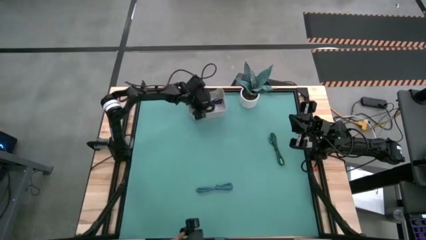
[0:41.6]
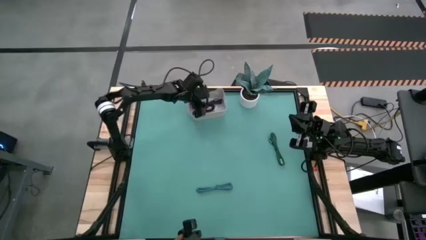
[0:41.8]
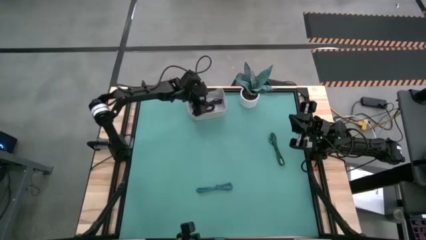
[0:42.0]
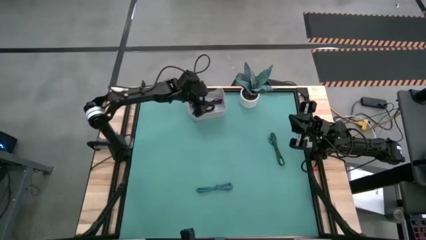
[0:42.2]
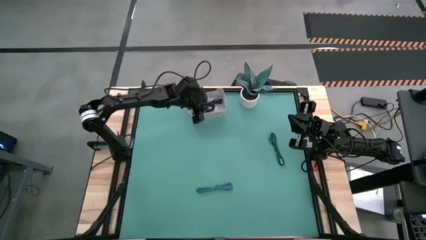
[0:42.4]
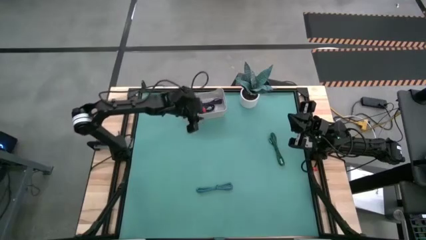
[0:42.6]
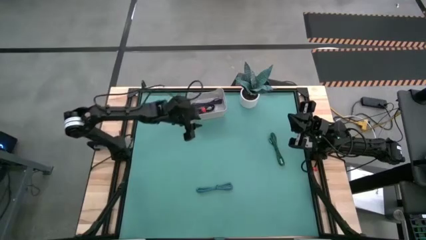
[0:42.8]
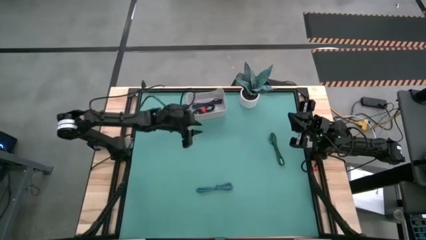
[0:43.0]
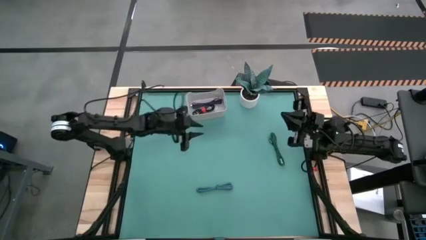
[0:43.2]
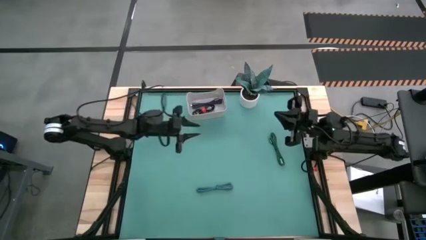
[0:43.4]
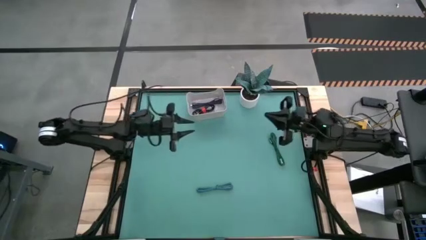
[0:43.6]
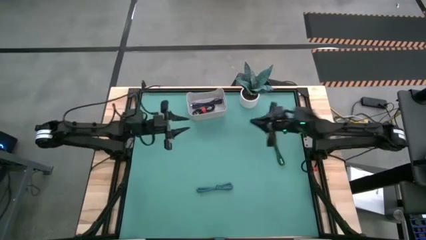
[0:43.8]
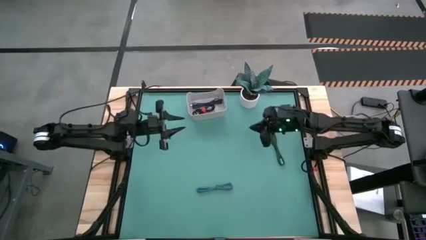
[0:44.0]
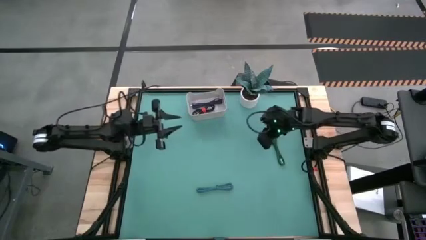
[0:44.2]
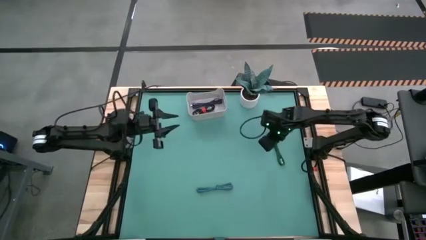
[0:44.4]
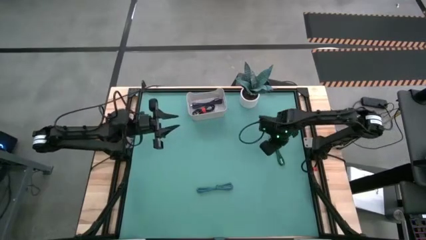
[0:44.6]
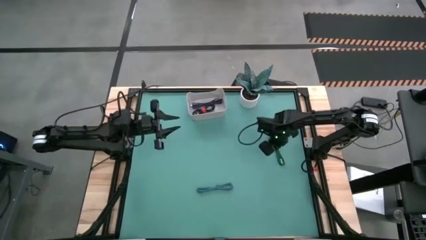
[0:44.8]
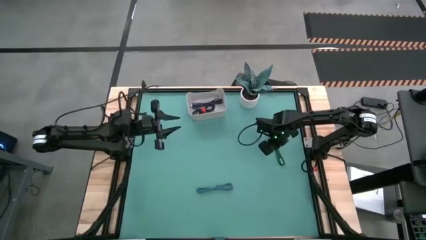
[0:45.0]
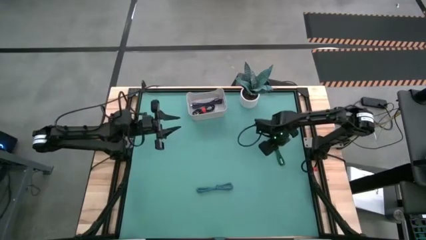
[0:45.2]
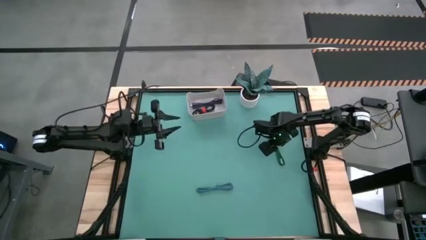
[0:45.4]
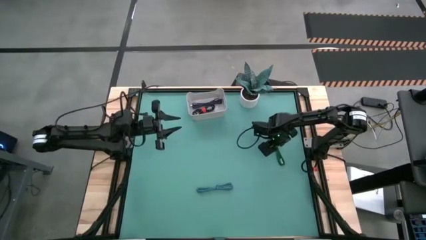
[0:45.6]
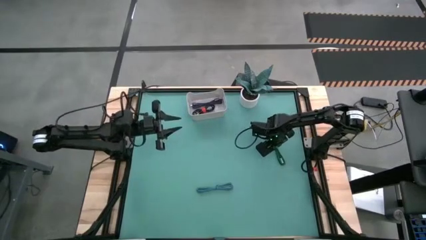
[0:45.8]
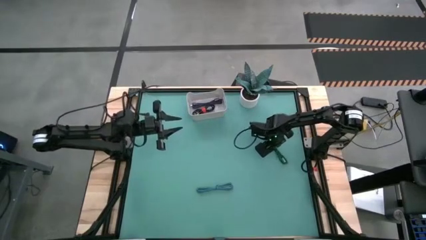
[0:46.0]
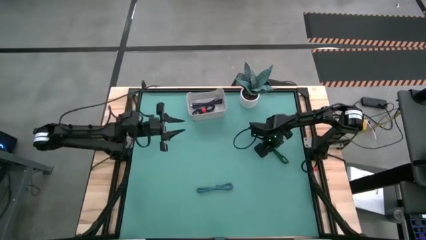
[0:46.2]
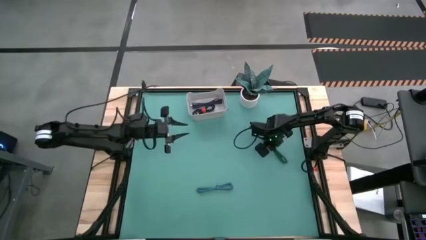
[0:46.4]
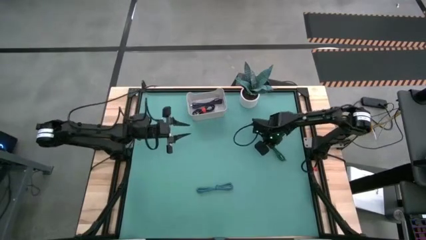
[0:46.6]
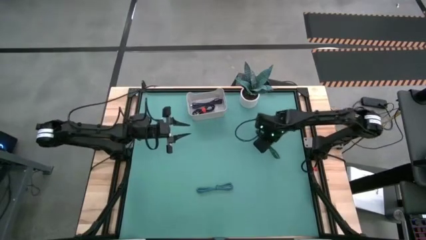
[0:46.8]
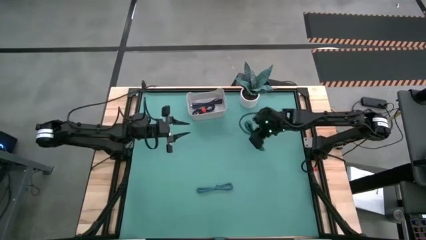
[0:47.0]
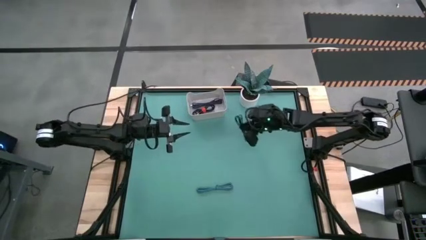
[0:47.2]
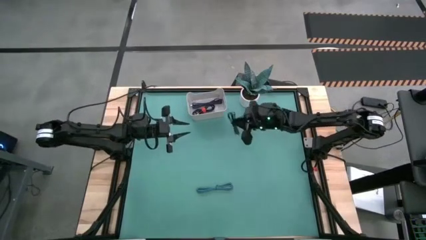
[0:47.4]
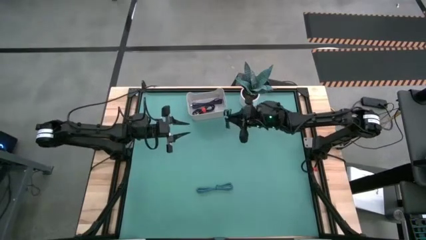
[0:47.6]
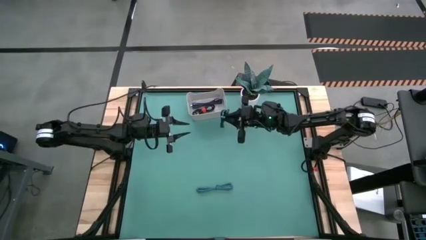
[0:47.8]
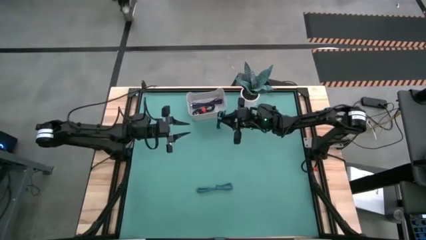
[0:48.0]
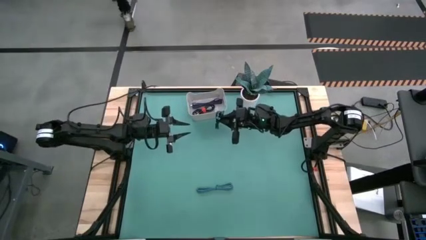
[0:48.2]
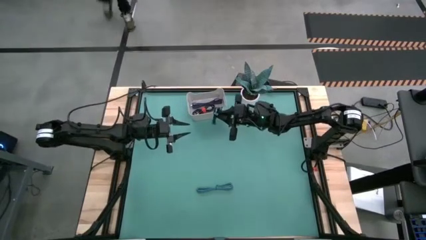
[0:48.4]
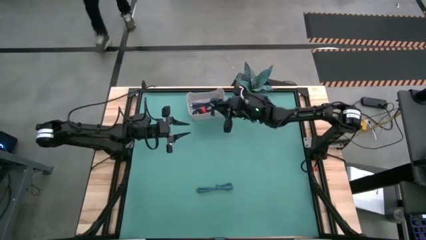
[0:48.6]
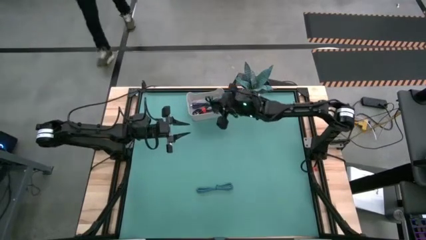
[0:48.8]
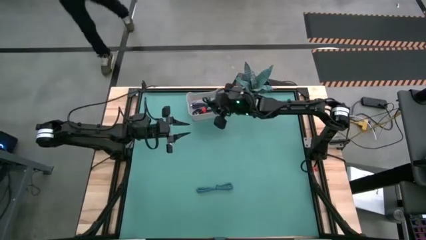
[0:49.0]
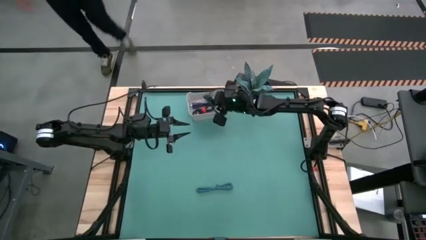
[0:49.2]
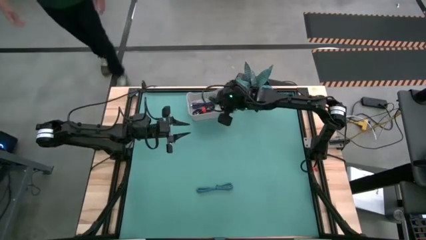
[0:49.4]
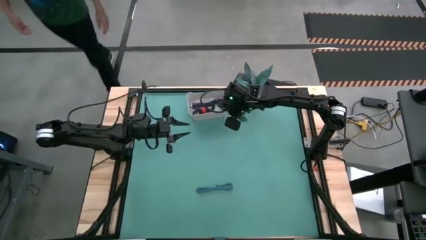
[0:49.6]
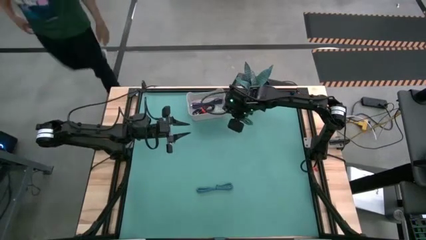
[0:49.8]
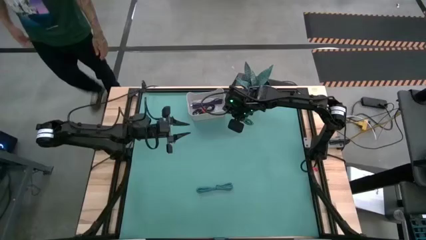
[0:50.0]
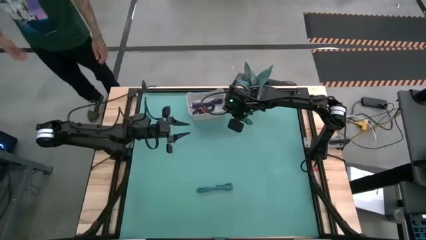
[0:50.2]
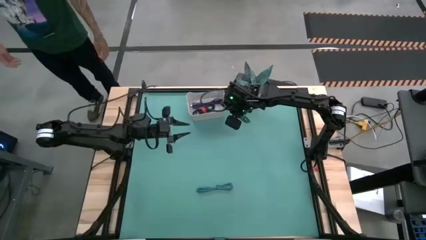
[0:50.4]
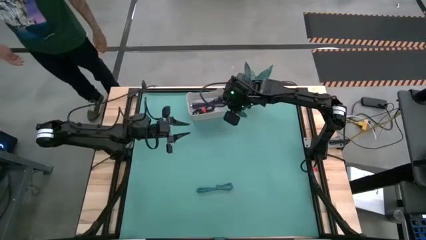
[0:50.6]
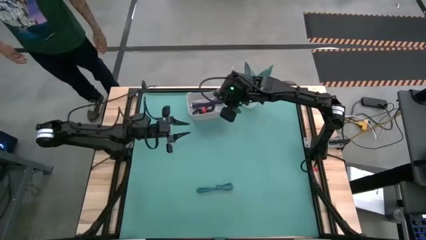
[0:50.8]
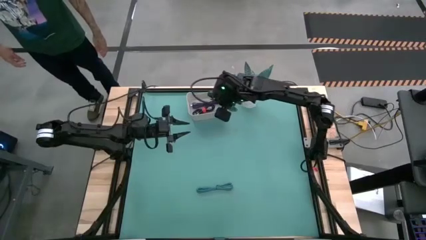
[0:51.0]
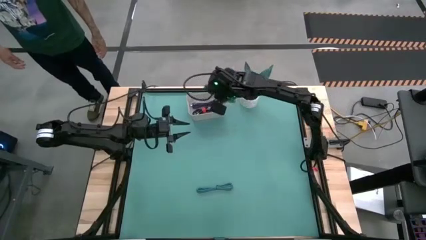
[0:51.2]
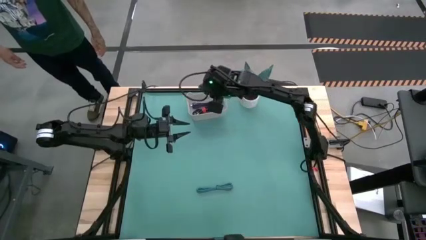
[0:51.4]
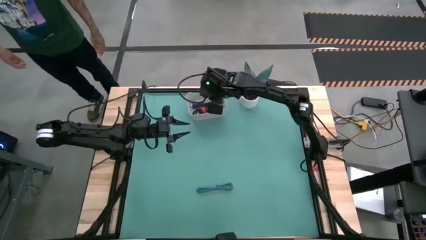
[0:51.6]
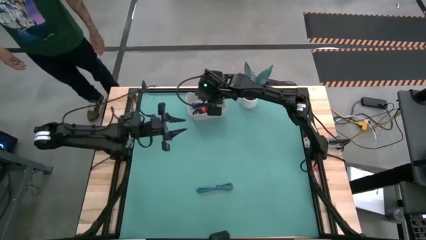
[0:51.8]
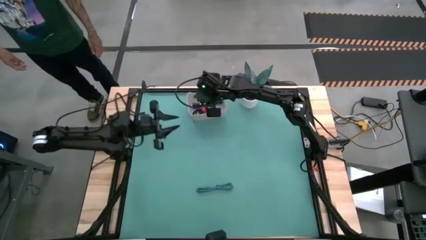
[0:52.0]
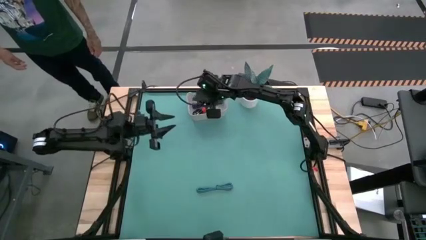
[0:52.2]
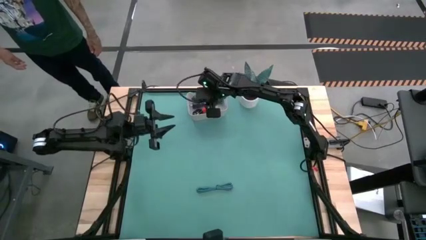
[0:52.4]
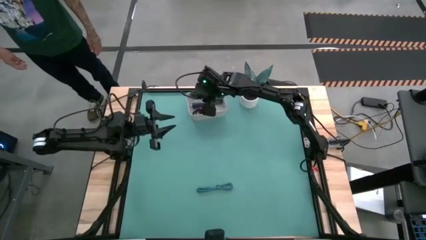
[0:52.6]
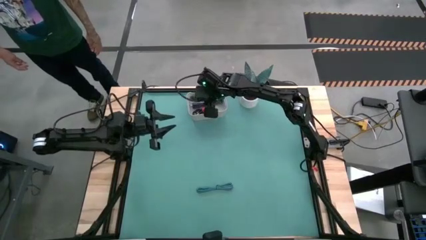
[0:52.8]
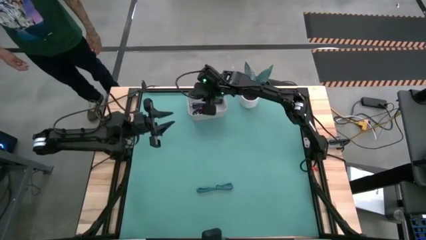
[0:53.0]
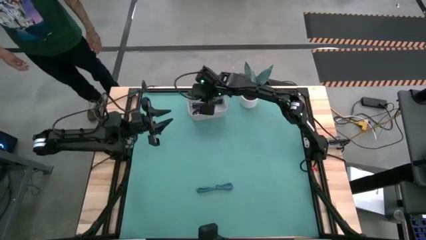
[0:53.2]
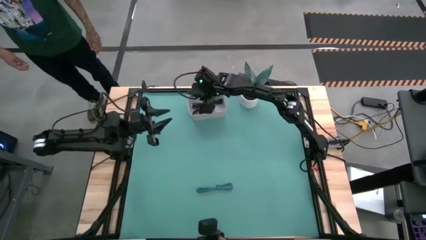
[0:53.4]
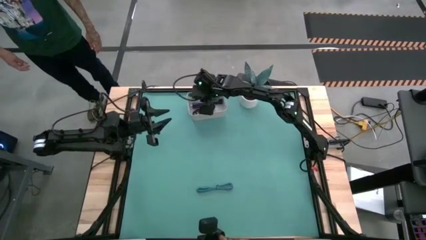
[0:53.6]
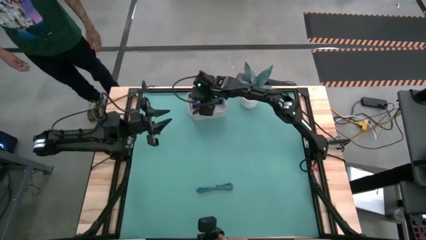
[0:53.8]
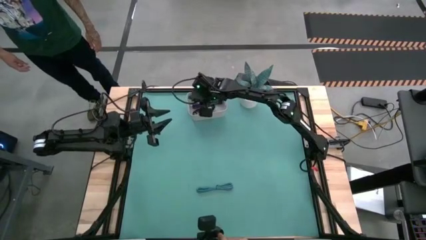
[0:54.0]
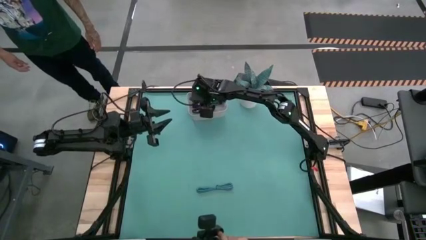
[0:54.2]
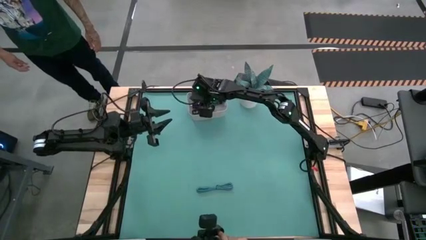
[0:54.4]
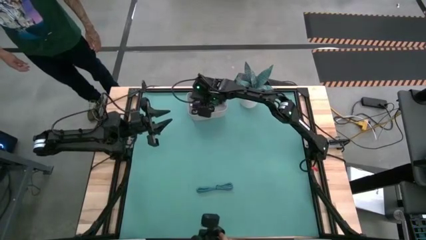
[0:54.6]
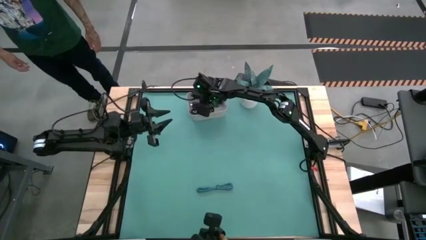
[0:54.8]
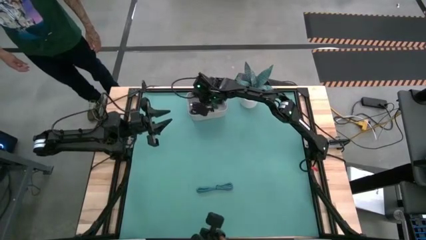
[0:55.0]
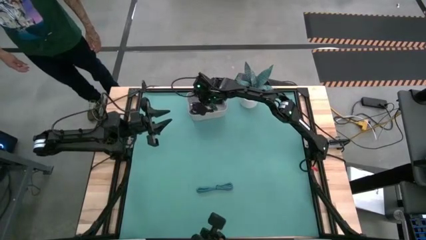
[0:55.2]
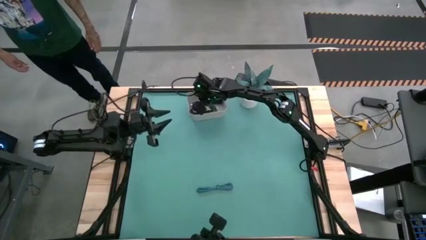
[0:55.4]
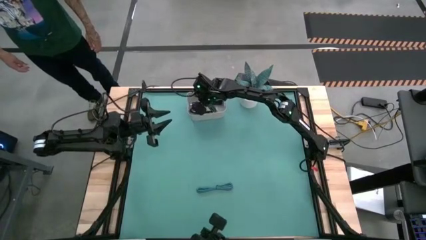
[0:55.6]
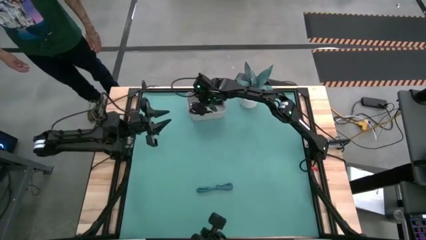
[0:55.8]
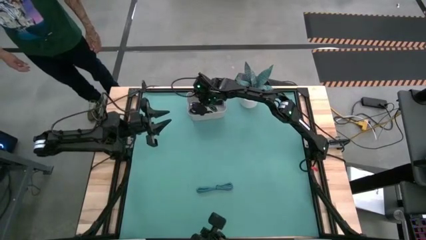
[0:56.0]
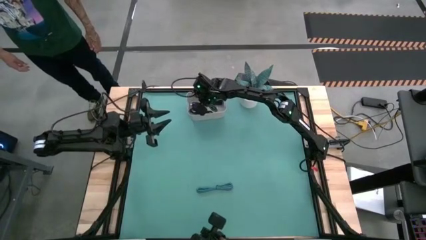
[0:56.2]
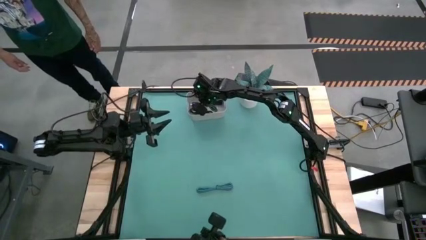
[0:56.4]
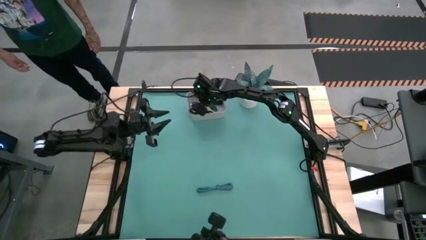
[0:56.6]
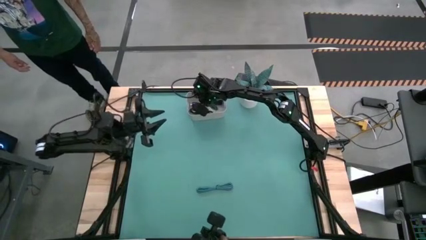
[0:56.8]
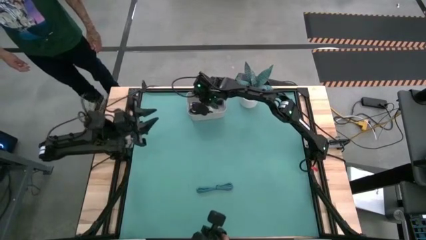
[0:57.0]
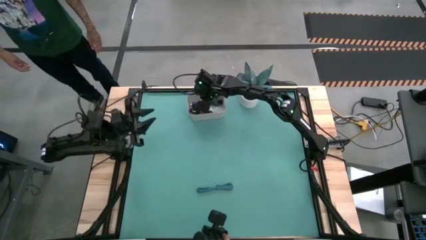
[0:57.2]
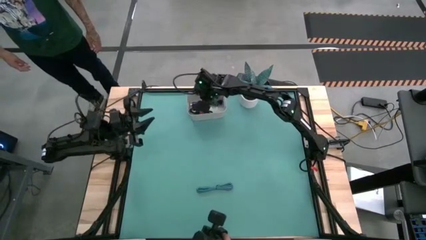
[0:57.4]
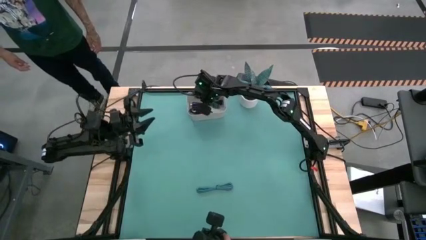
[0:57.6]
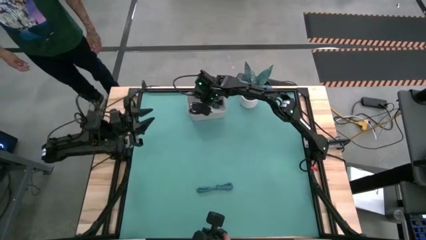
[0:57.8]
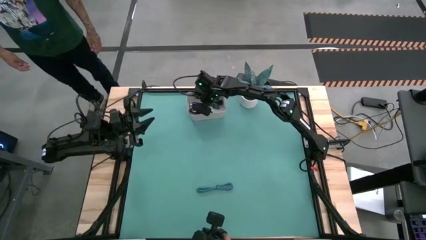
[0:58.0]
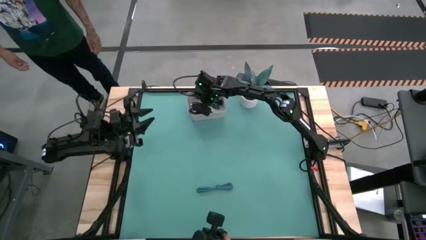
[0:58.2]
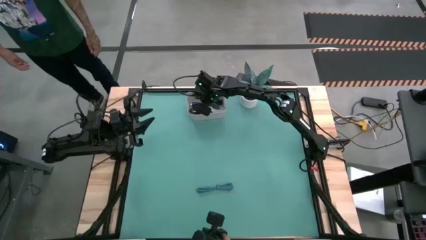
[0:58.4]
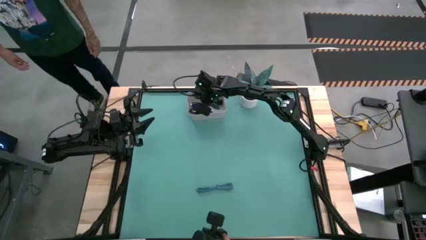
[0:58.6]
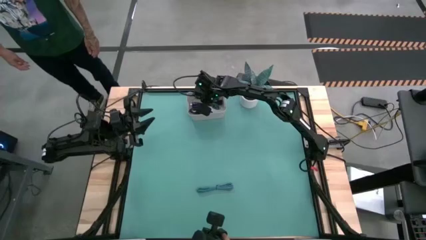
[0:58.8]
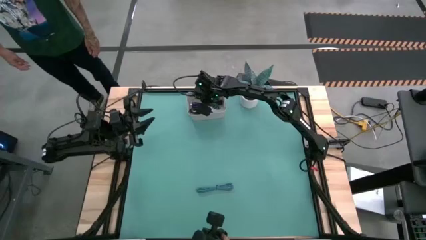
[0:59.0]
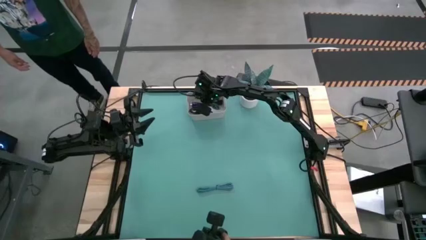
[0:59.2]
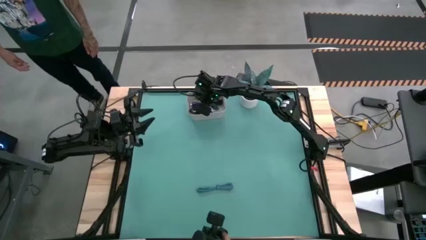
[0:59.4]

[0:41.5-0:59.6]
Task: Pick and place USB-C Cables
Put the green charger cable into the white bin
